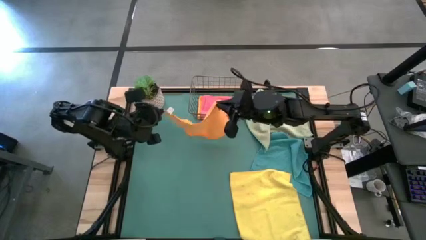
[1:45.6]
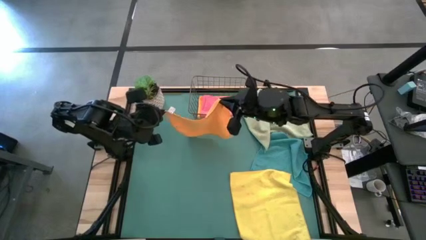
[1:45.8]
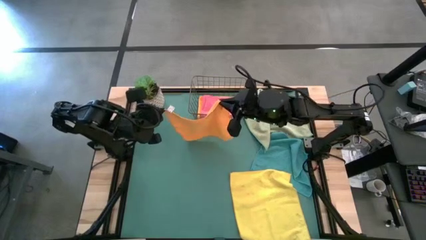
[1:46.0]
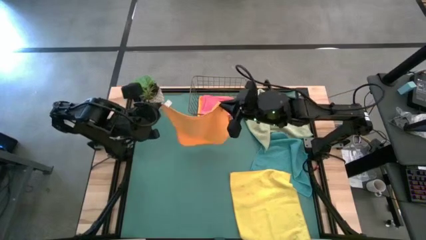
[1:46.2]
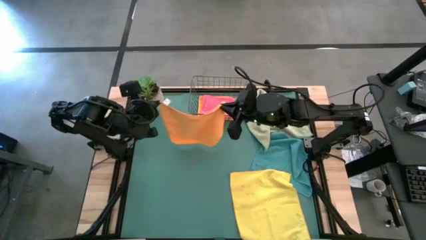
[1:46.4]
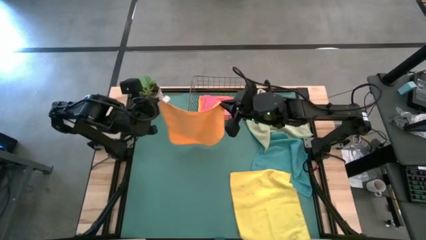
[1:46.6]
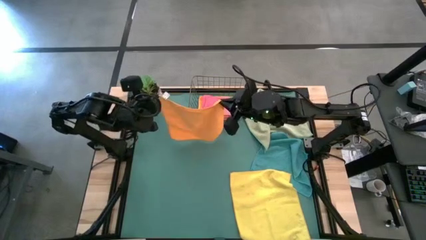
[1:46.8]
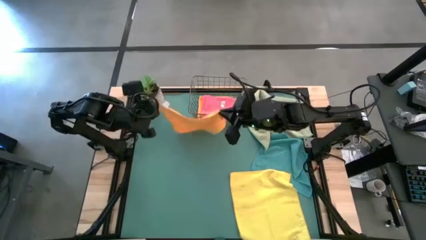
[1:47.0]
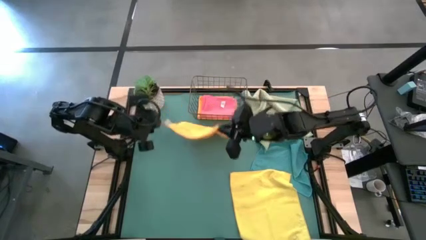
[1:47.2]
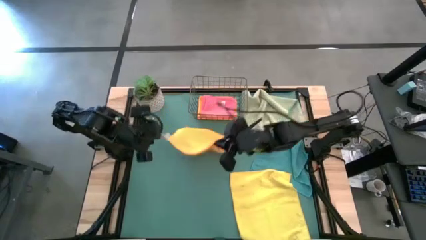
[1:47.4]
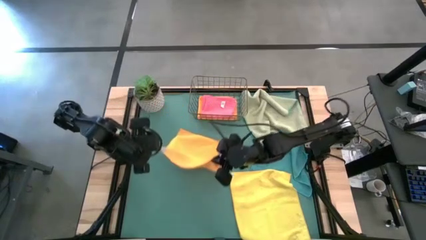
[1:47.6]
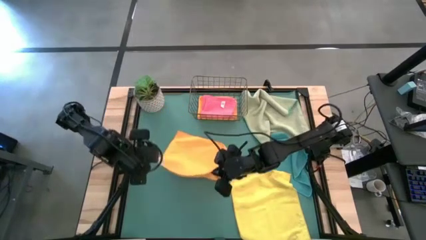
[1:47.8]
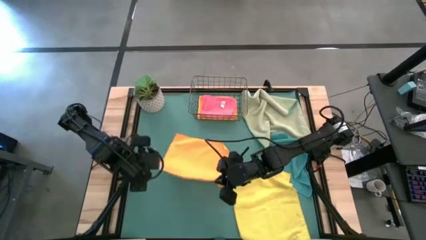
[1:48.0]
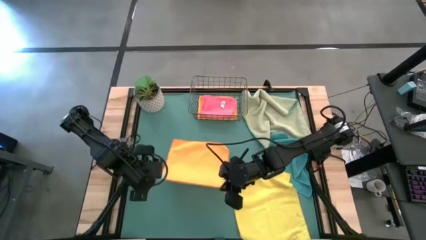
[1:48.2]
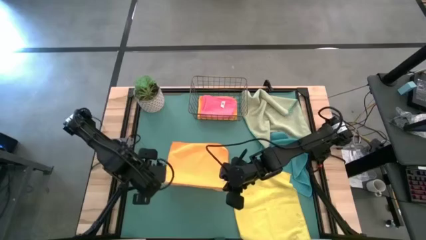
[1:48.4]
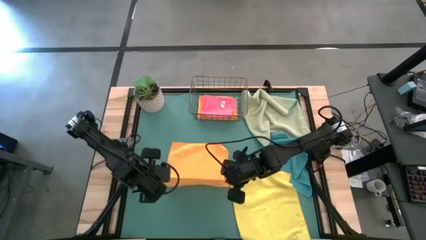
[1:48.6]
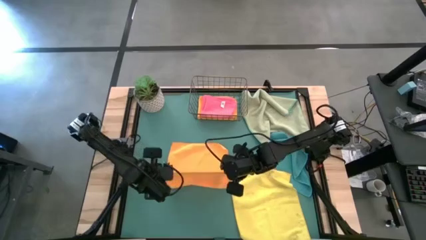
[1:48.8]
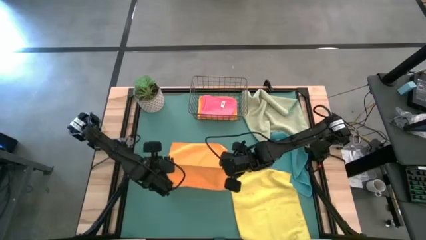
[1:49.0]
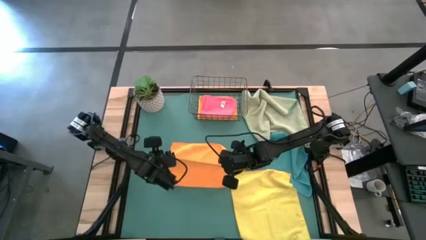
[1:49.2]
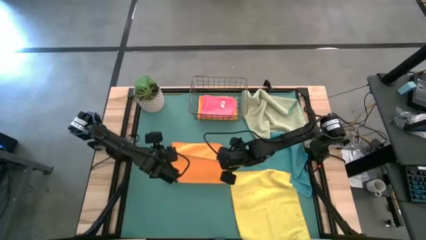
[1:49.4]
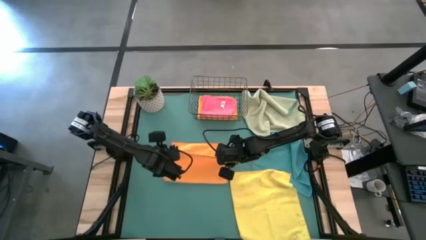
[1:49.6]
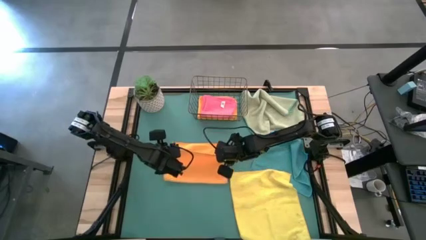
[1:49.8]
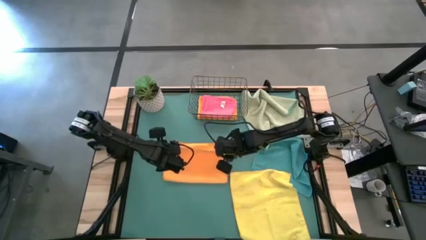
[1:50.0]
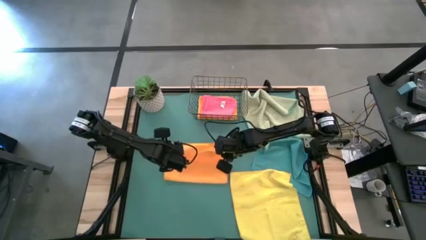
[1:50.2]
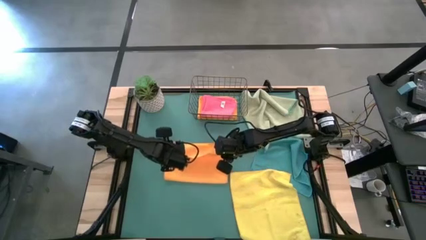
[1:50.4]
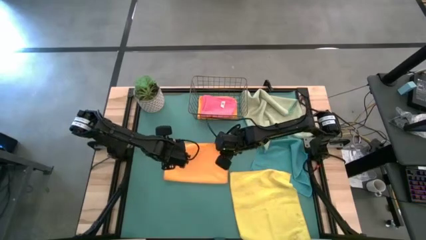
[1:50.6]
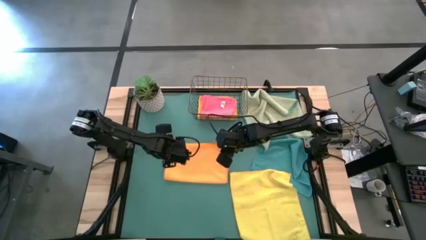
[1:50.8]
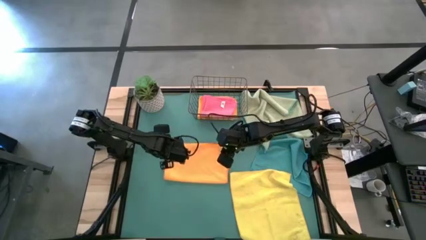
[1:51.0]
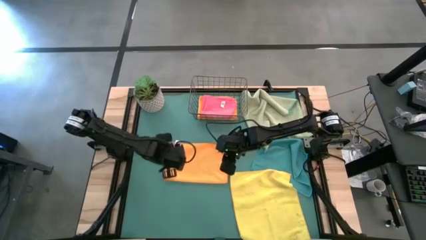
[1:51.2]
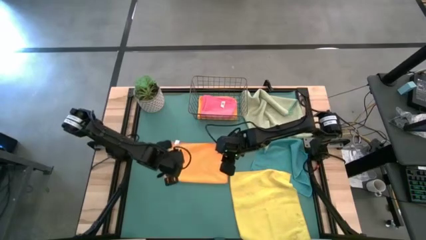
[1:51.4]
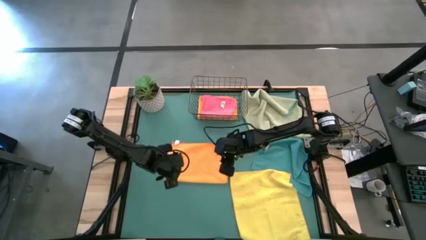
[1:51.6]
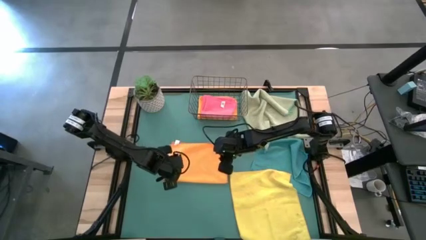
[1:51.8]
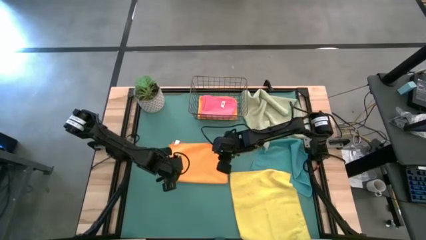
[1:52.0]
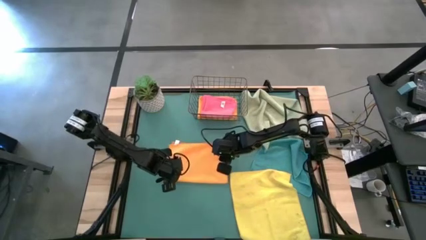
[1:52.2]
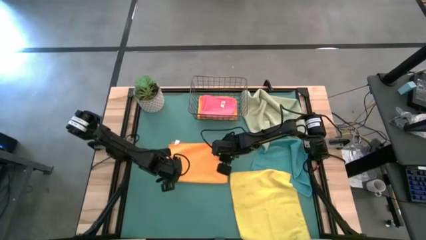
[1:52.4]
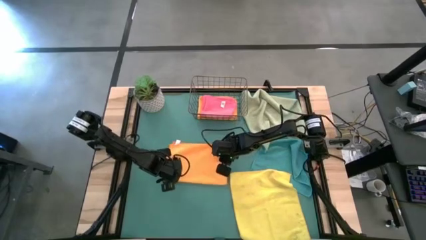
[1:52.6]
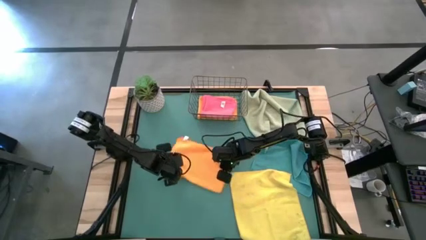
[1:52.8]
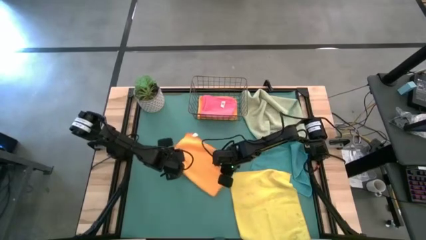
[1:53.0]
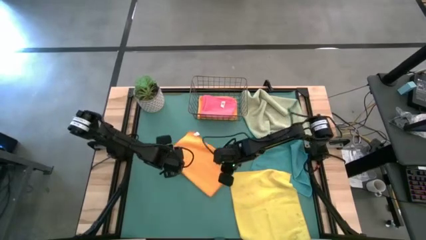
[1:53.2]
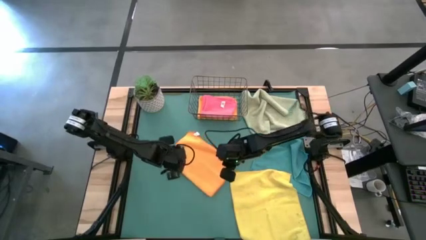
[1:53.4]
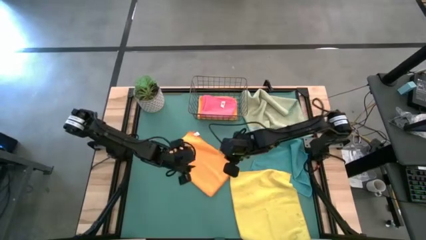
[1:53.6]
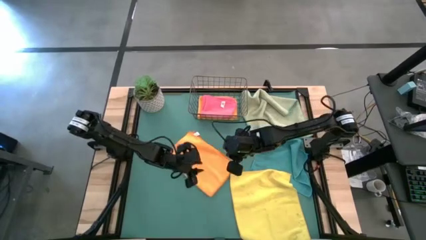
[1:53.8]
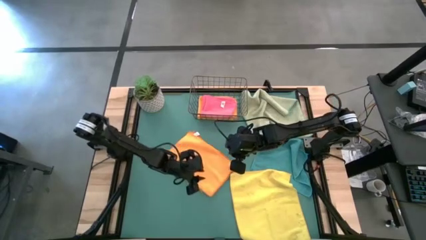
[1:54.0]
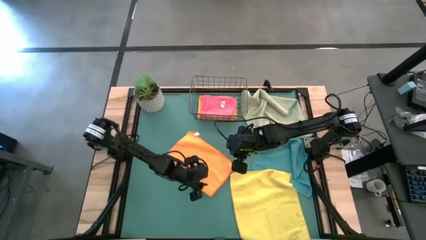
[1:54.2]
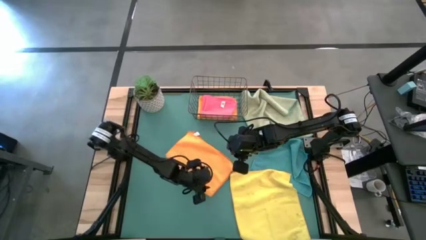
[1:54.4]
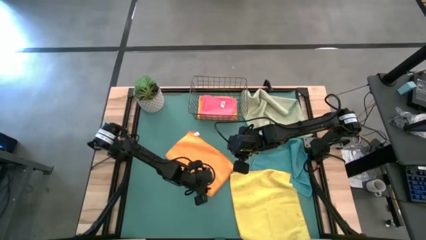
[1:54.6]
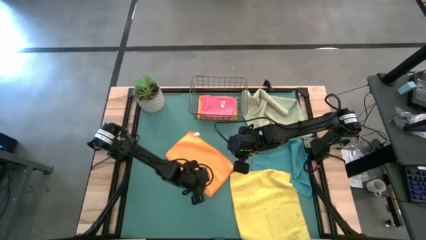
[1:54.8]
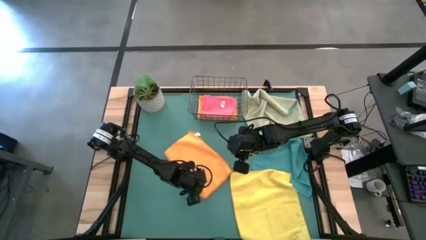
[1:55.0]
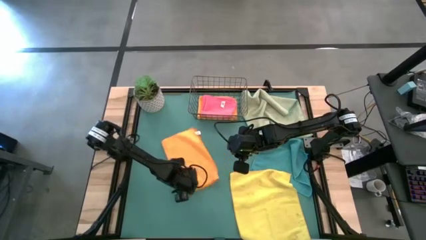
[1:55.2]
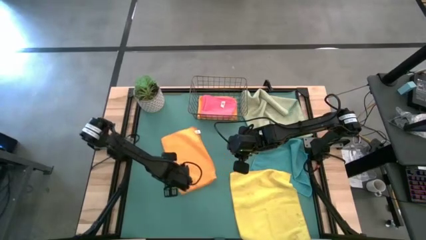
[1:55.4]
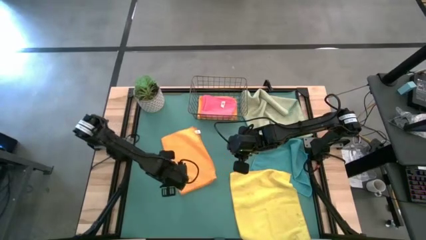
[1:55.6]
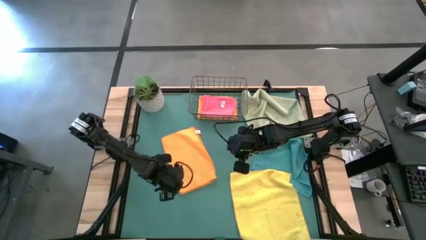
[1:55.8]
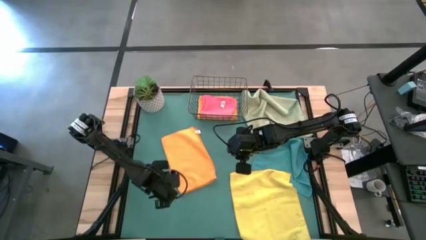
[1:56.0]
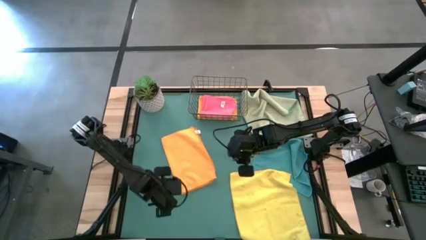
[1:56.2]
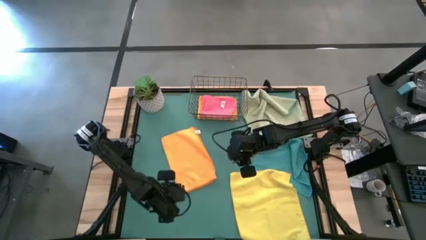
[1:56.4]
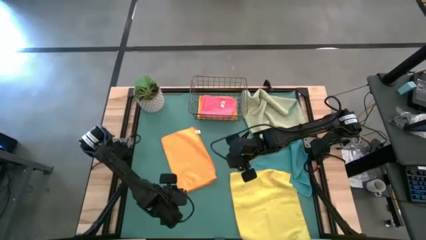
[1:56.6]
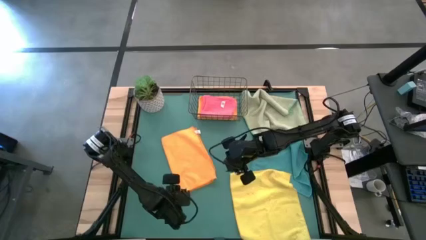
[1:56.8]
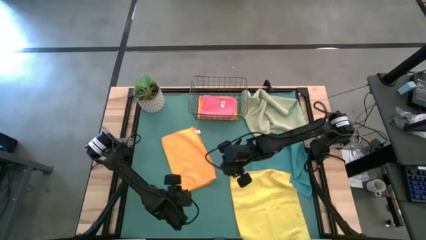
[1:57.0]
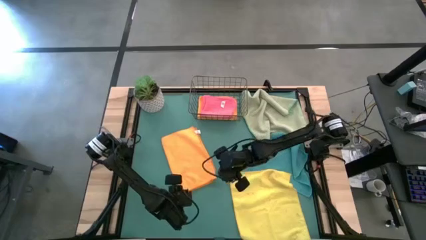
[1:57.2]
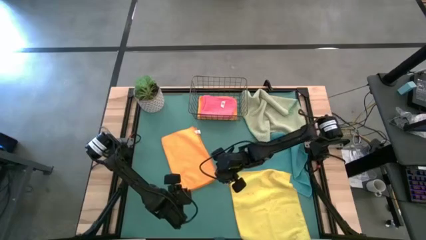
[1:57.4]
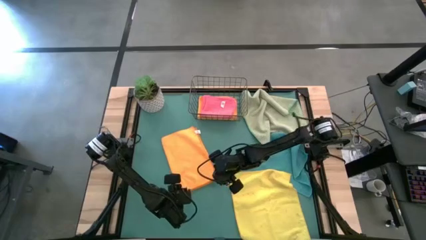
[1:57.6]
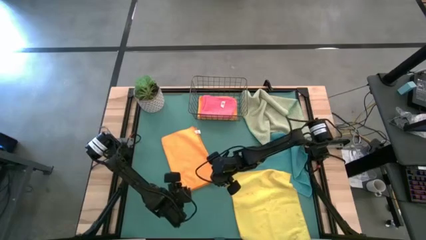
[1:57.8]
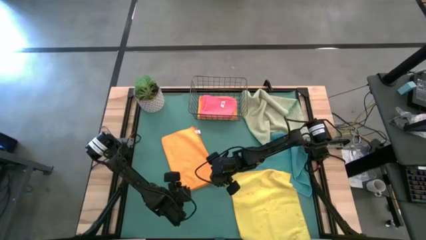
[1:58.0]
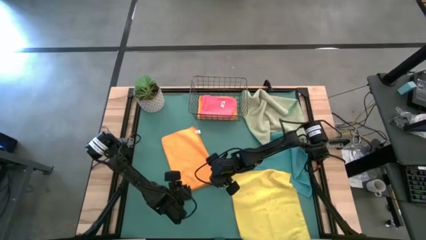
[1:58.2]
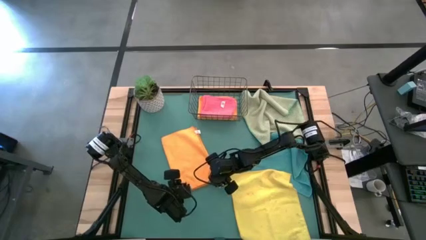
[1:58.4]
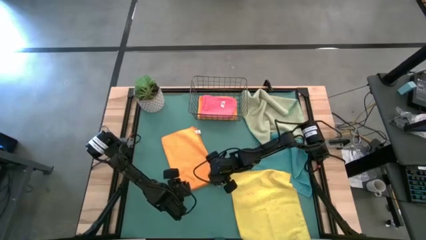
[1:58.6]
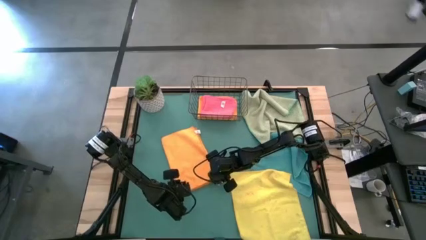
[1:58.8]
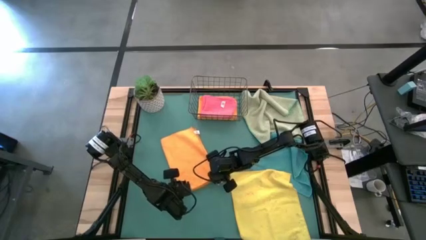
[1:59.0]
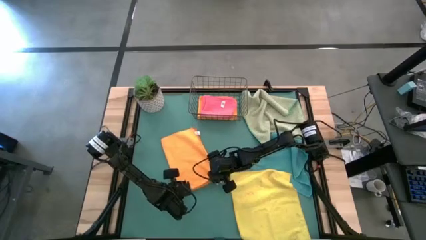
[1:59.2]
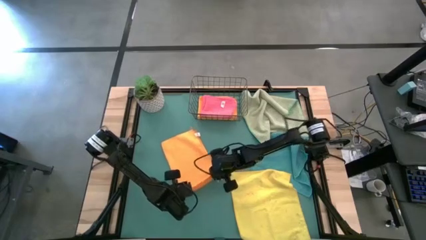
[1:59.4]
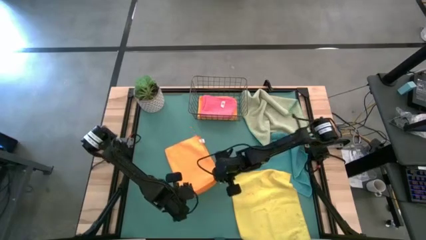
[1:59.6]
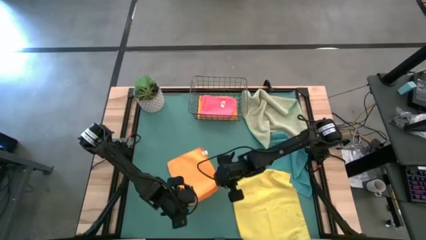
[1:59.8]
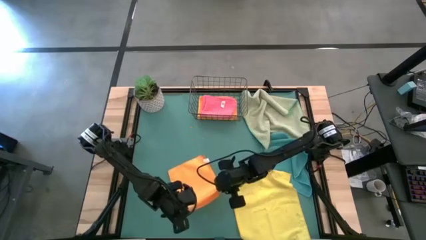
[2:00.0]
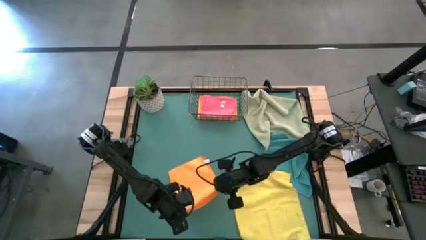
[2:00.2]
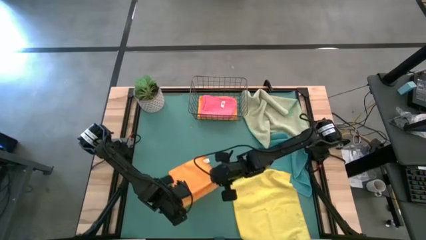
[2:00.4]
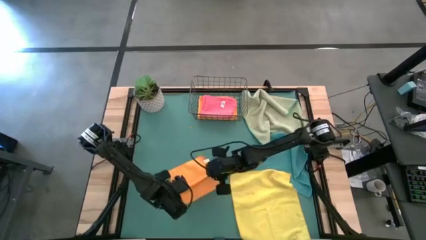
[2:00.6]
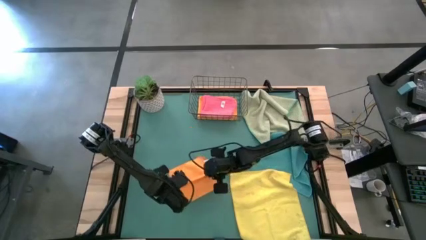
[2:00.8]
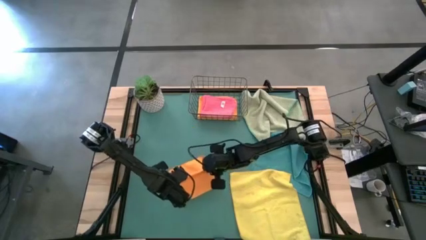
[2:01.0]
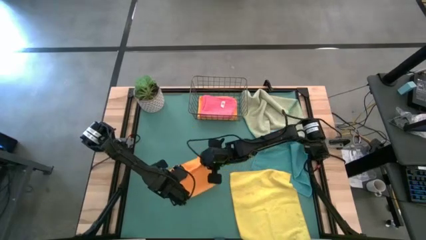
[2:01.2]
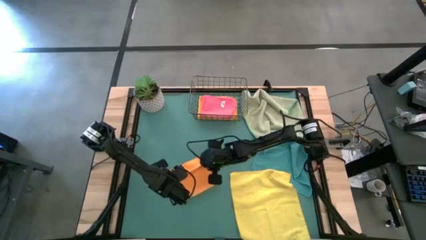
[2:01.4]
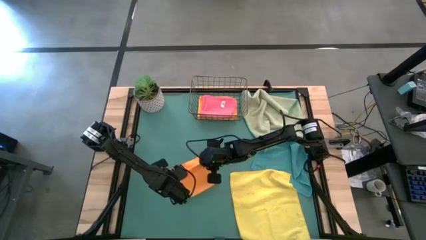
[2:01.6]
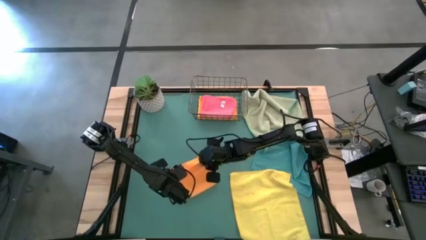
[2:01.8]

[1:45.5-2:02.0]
Task: Fold microfiber towels
Fold the orange microfiber towel
